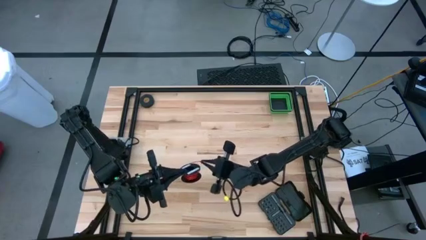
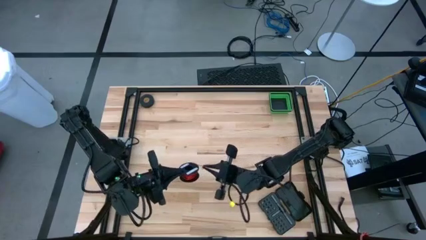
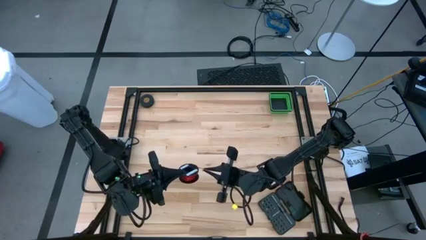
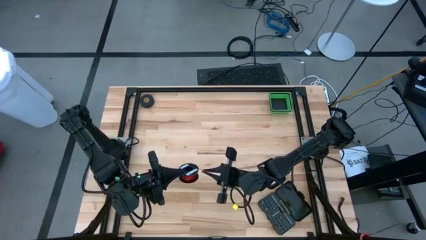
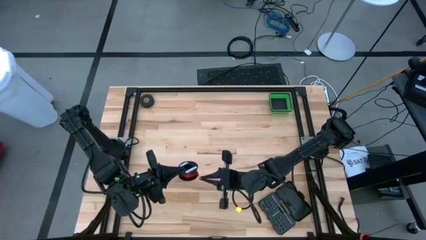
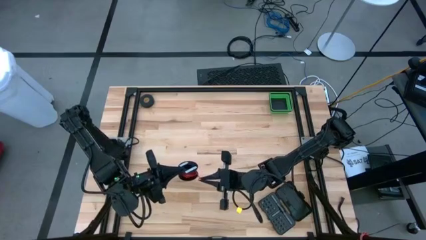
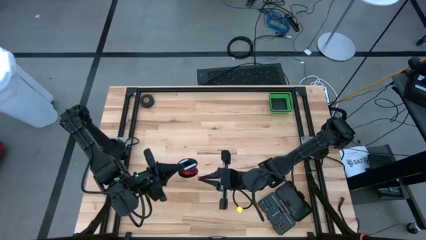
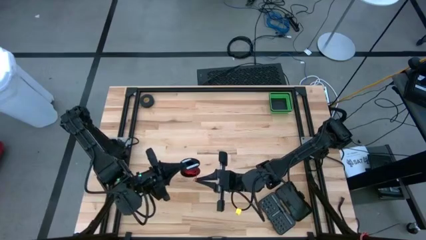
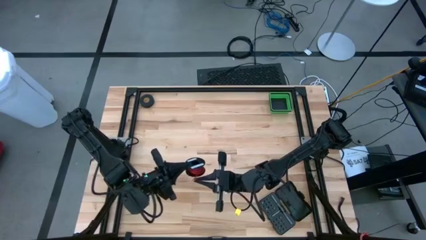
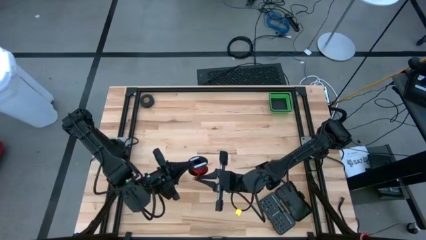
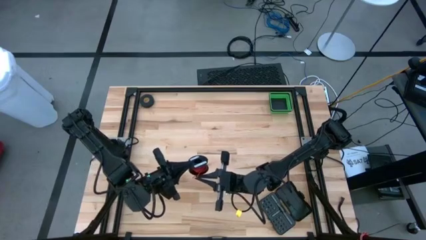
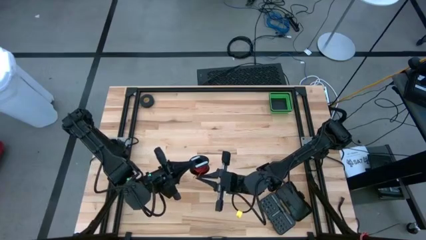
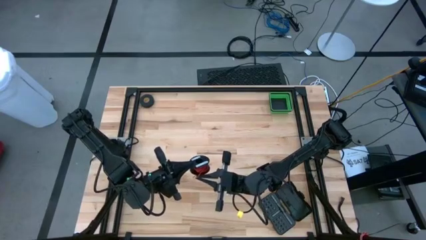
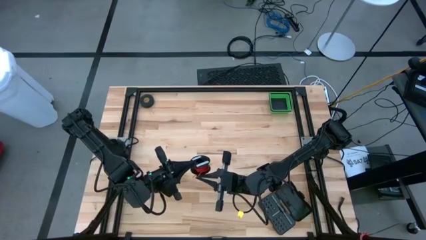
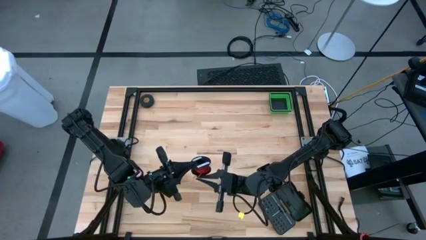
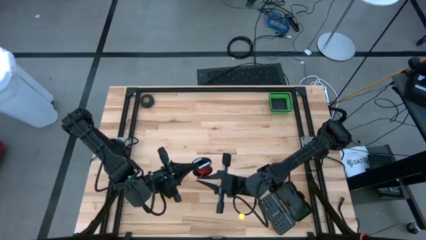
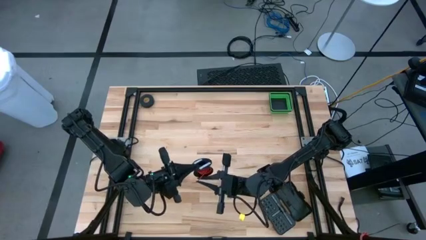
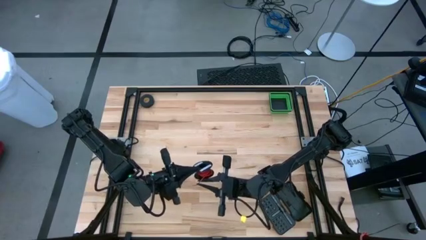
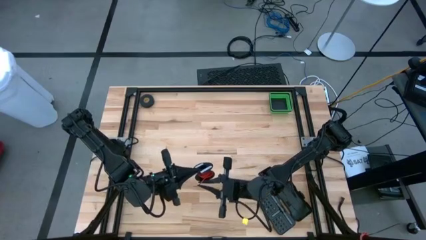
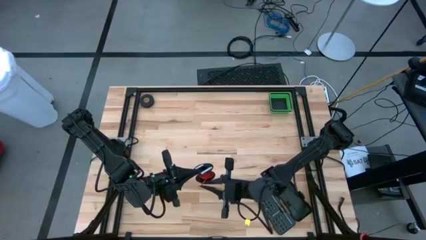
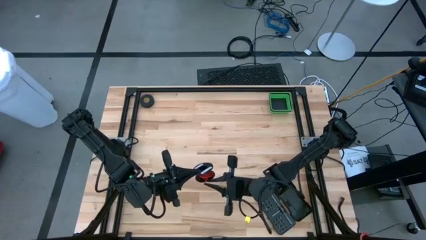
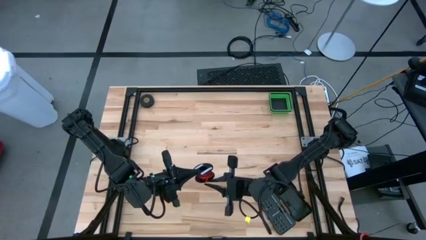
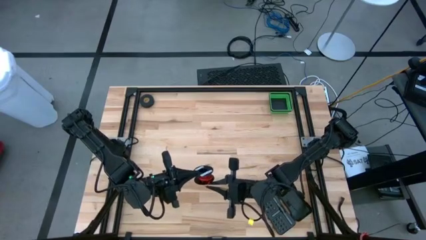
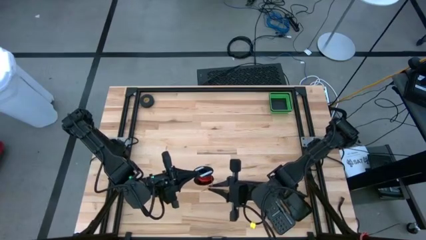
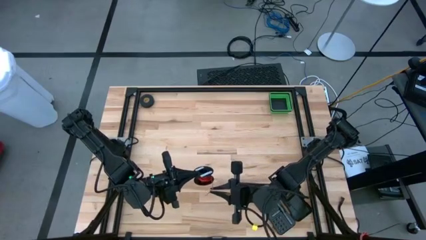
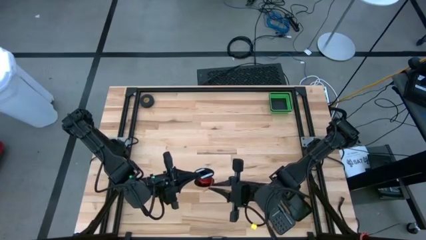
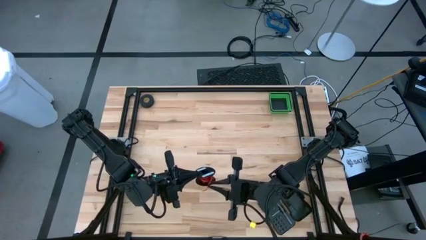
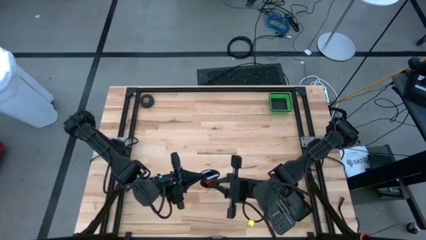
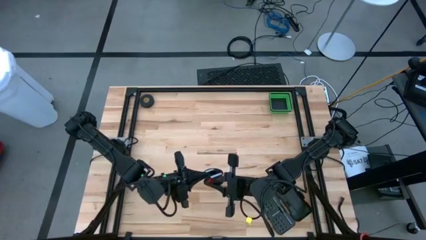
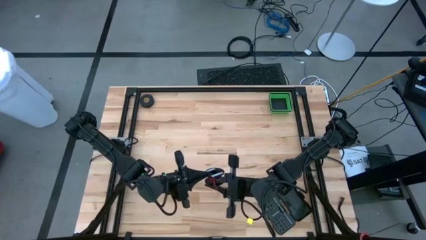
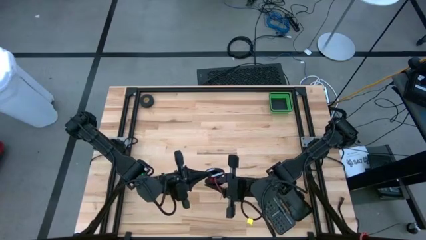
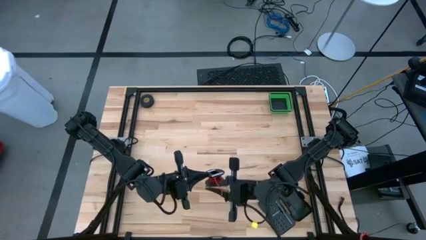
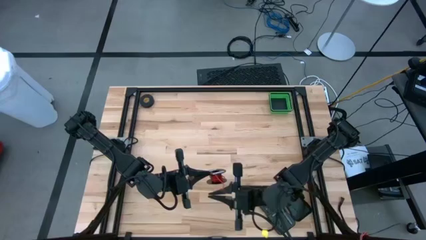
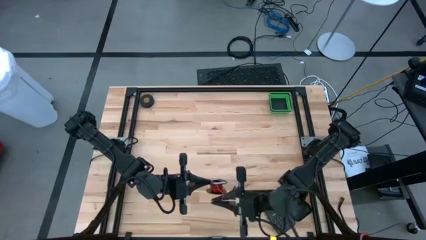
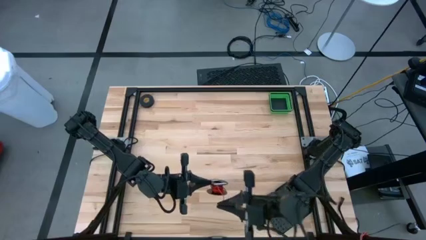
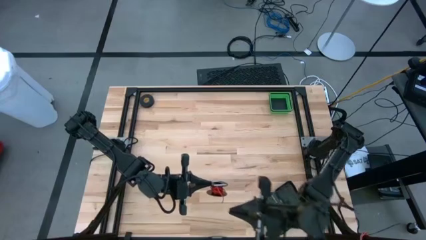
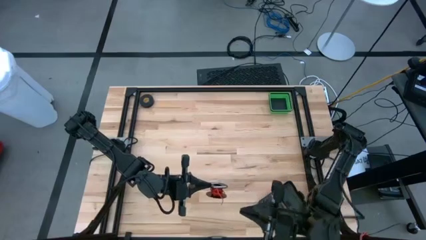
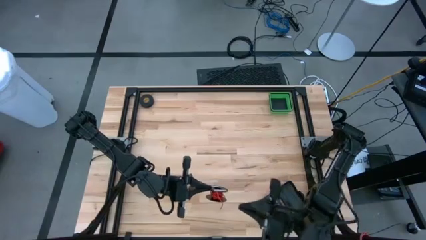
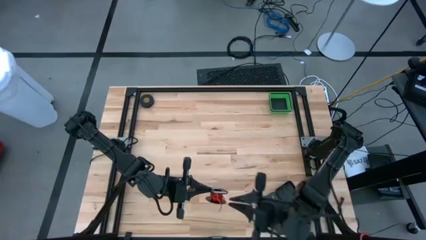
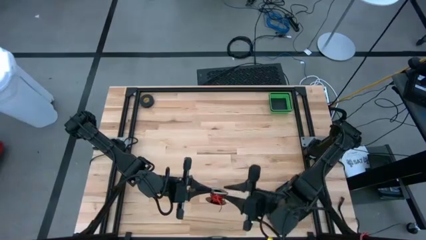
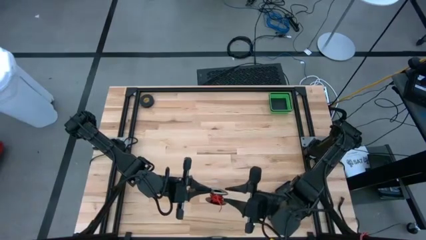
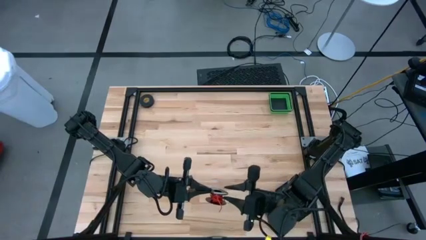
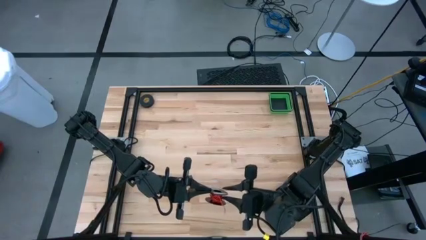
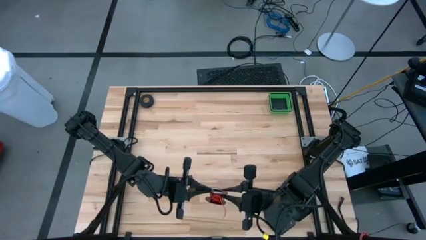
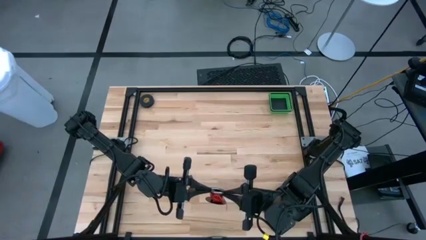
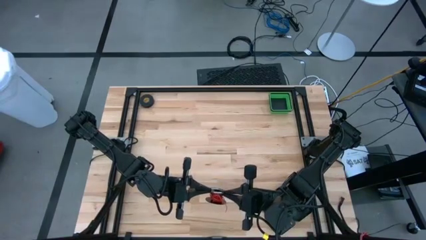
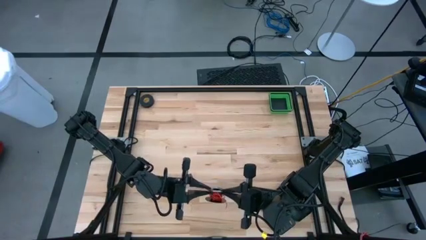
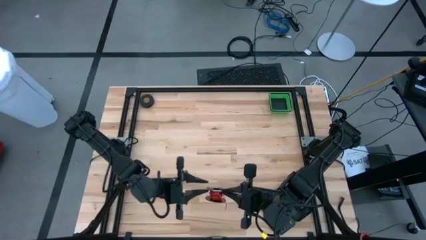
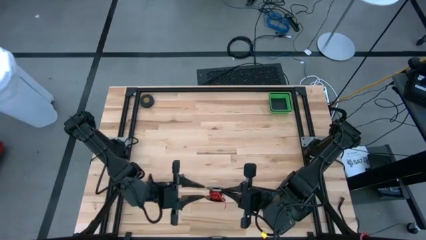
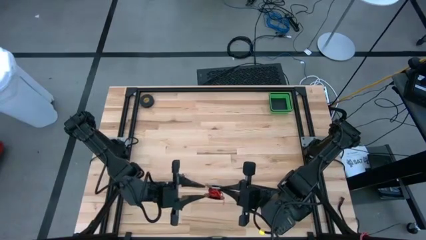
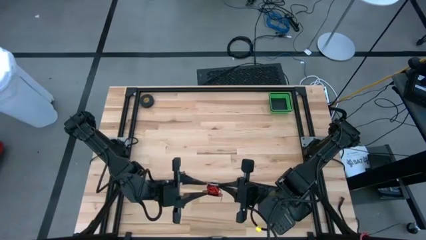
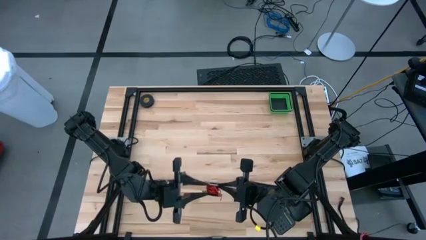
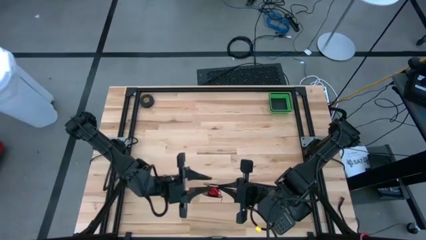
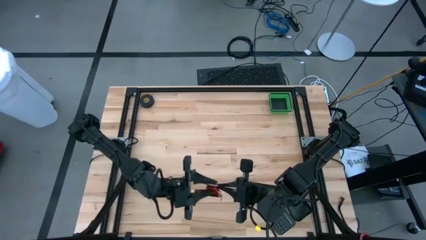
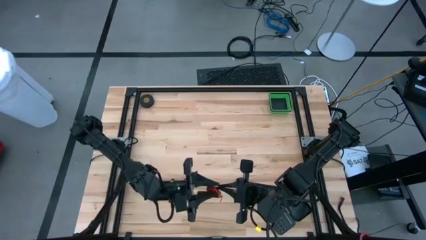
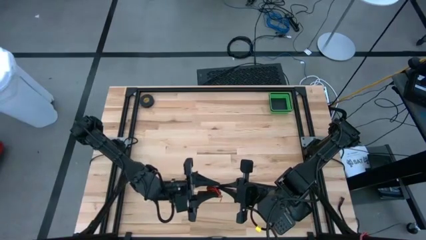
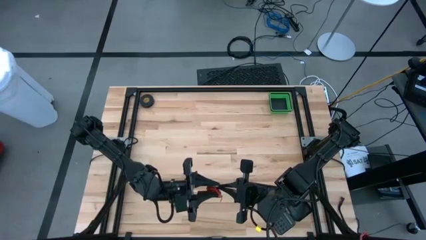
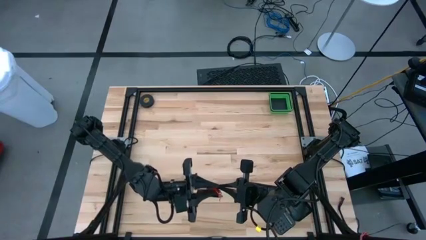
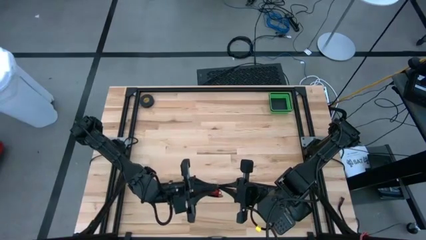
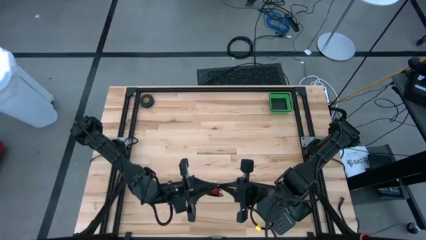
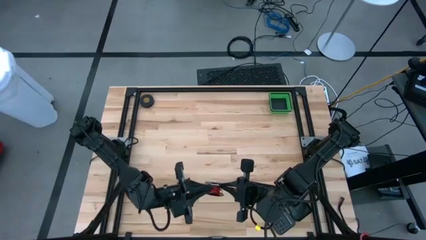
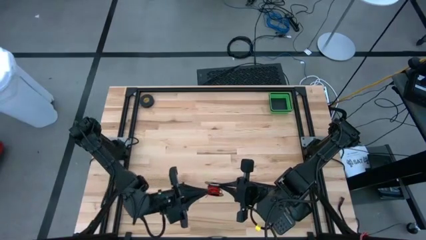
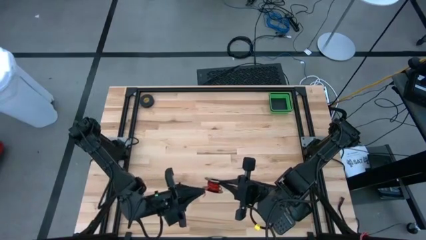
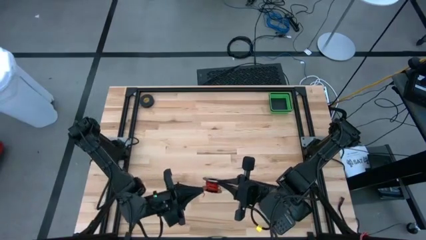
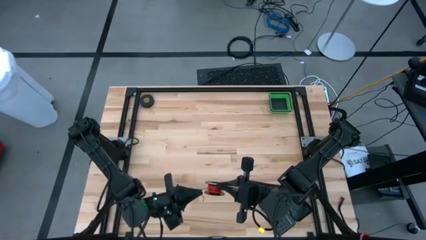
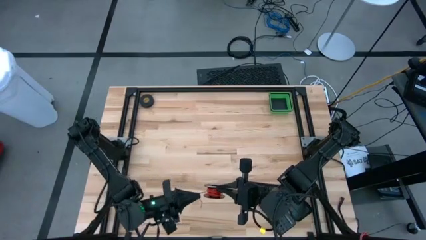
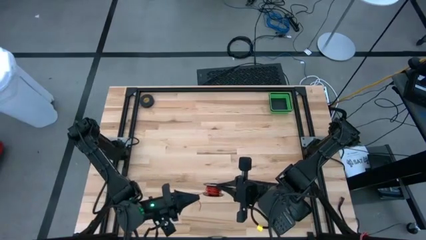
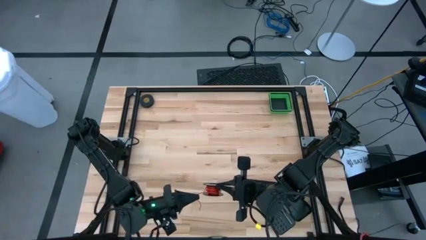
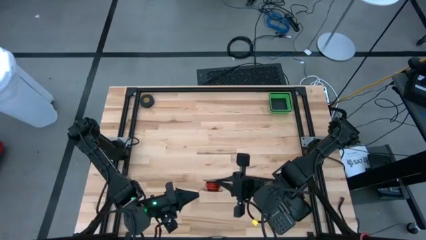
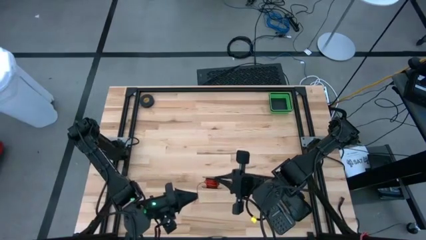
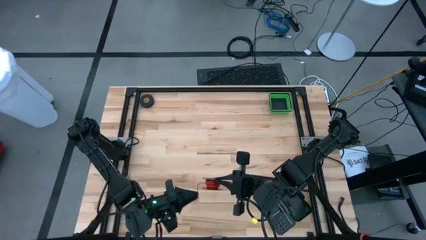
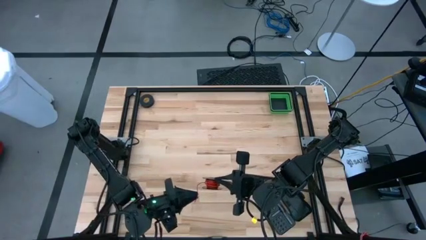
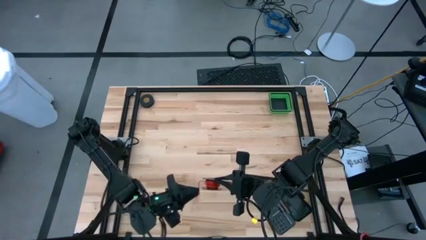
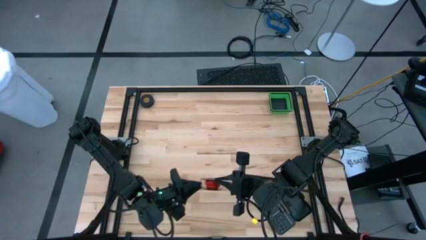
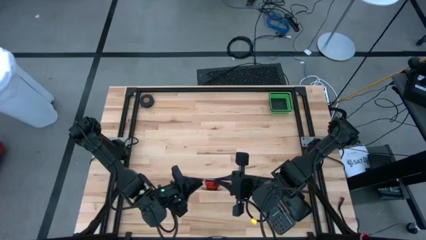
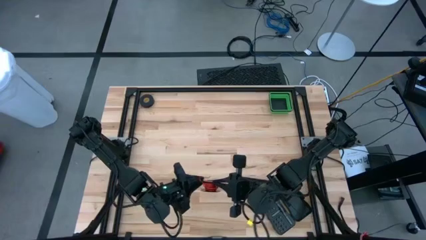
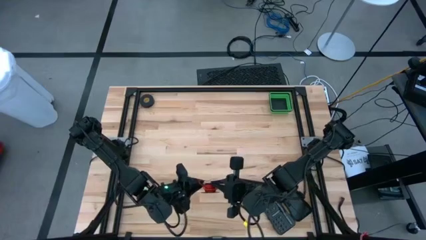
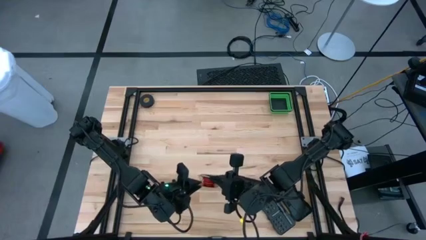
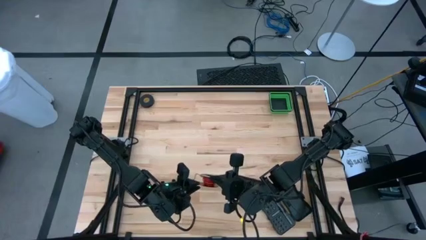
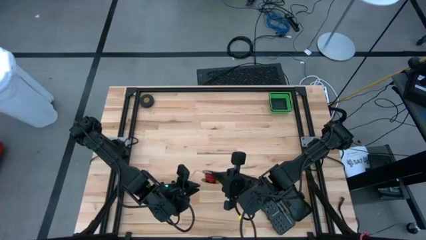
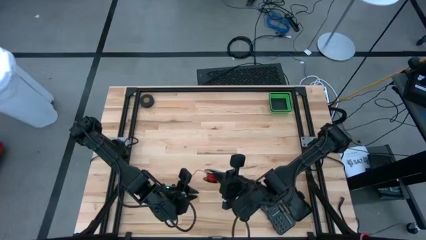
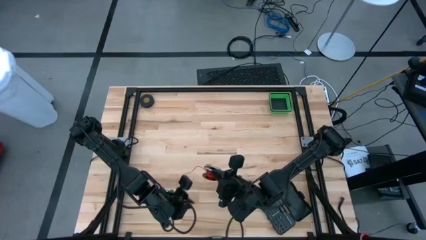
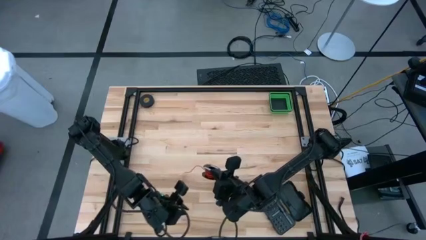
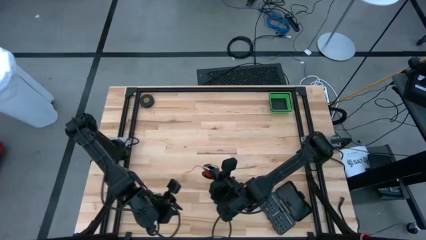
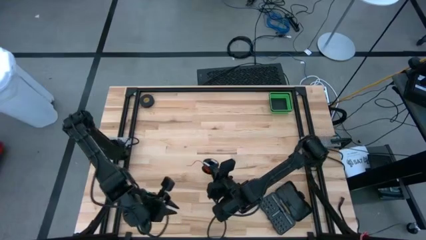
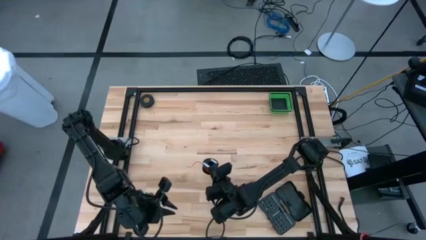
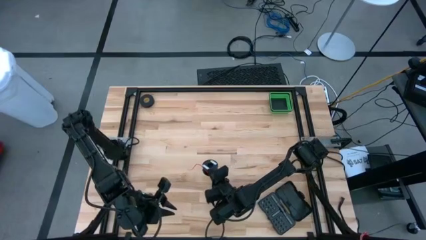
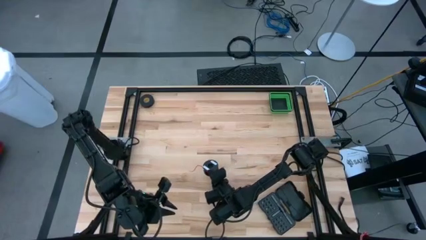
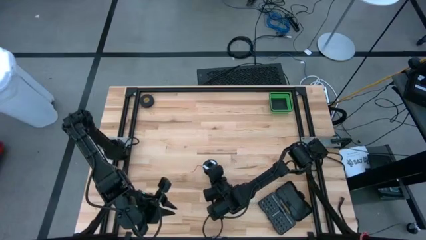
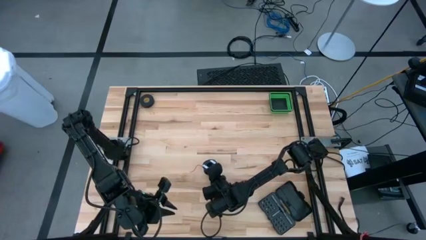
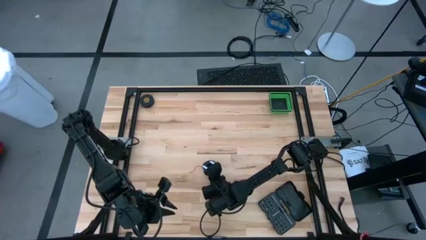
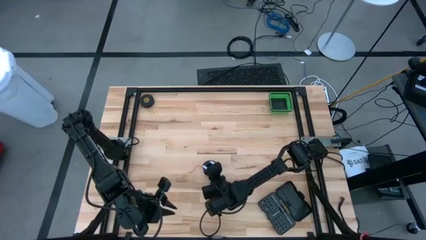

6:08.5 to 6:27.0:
Task: Coil cords
Coil the red wire on the black spool
